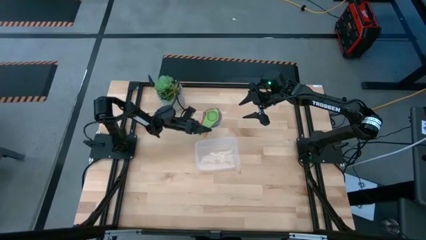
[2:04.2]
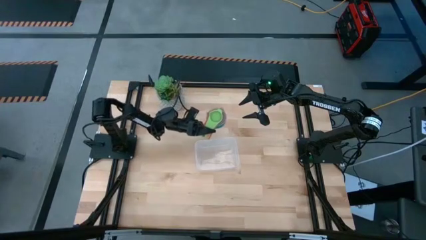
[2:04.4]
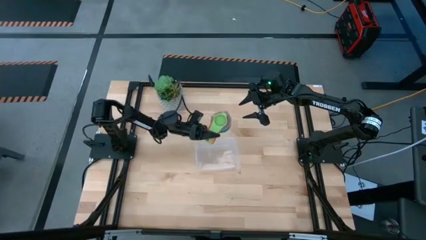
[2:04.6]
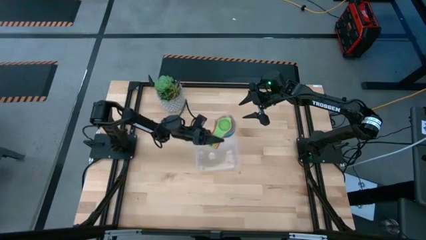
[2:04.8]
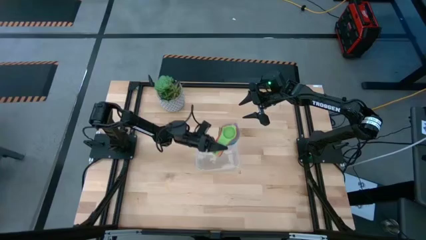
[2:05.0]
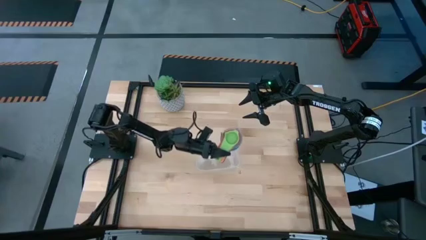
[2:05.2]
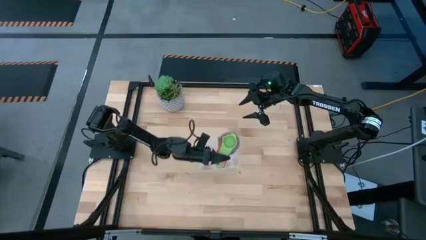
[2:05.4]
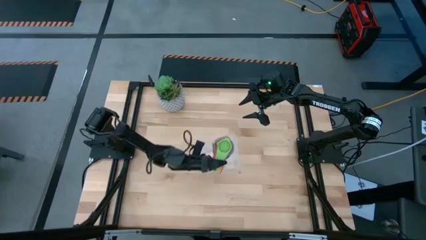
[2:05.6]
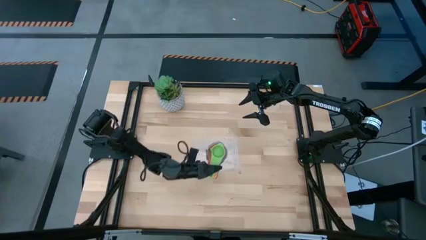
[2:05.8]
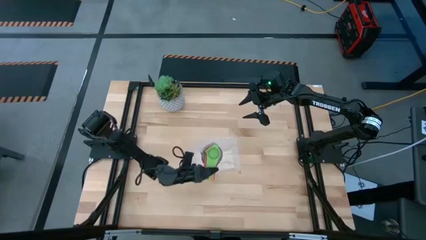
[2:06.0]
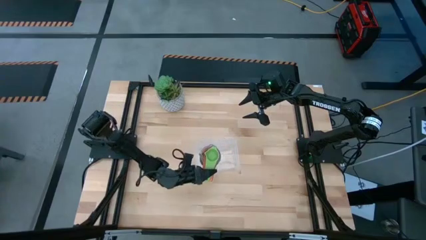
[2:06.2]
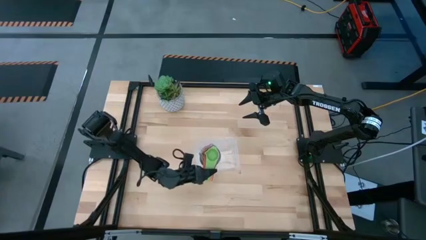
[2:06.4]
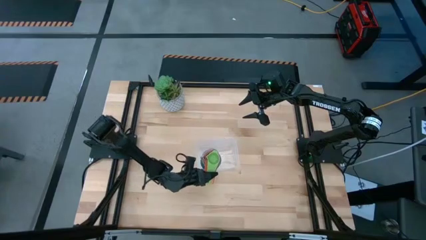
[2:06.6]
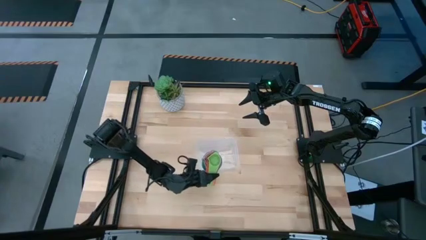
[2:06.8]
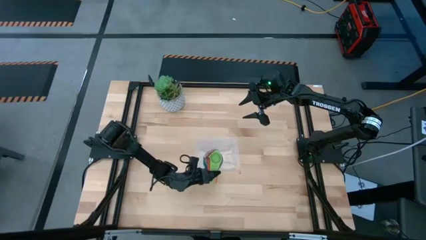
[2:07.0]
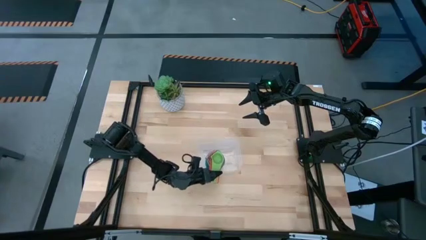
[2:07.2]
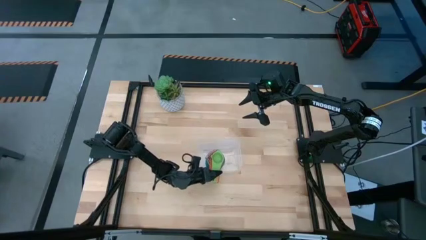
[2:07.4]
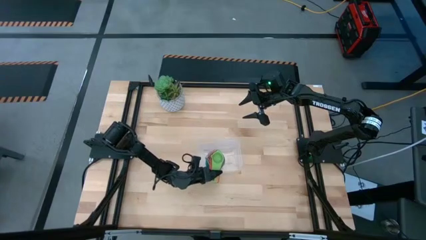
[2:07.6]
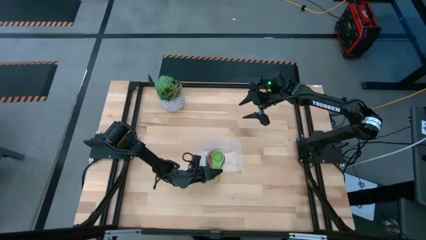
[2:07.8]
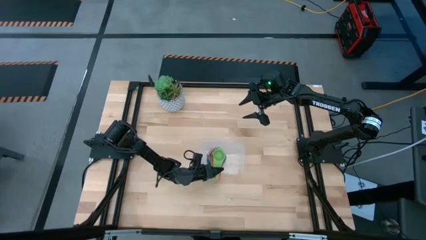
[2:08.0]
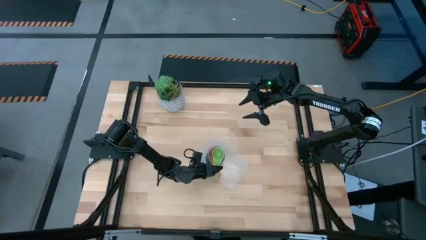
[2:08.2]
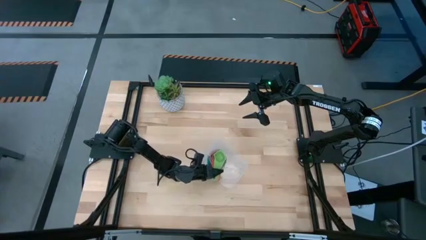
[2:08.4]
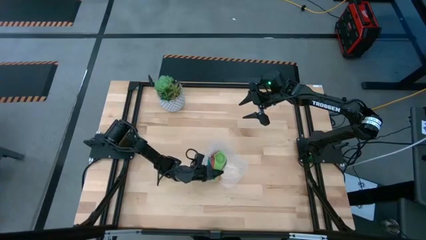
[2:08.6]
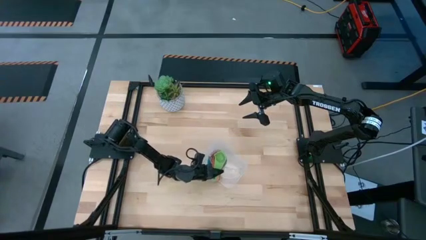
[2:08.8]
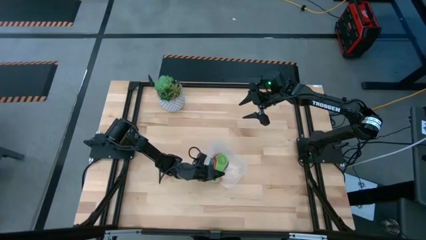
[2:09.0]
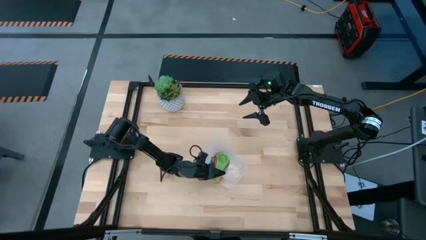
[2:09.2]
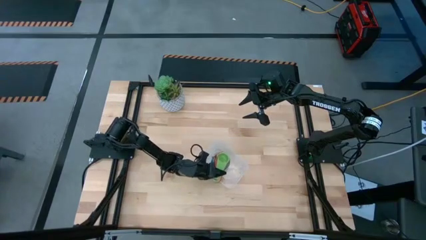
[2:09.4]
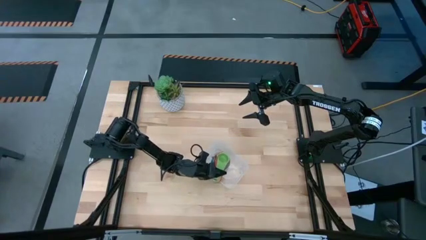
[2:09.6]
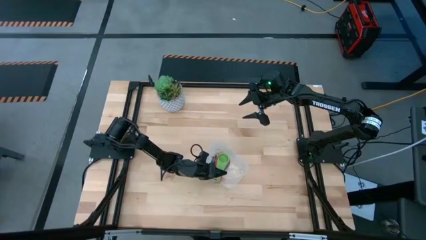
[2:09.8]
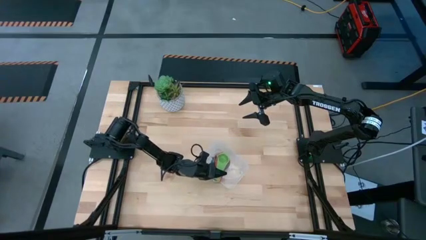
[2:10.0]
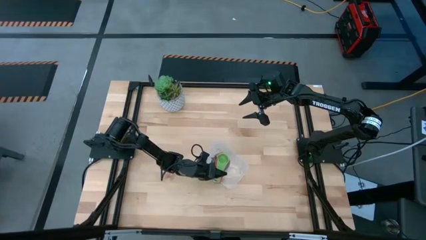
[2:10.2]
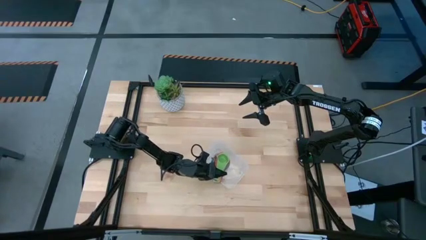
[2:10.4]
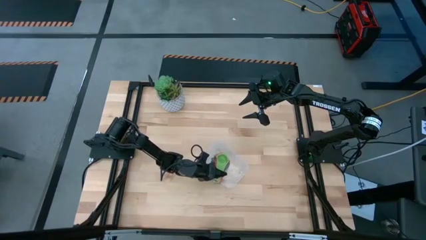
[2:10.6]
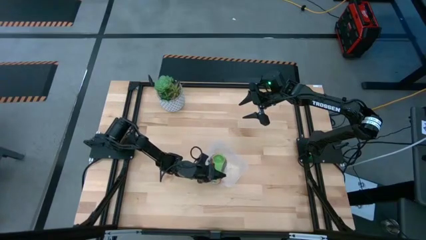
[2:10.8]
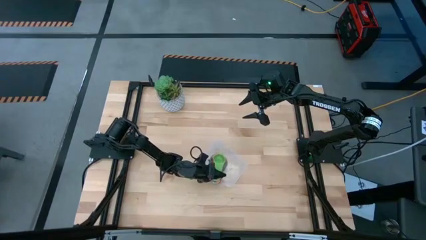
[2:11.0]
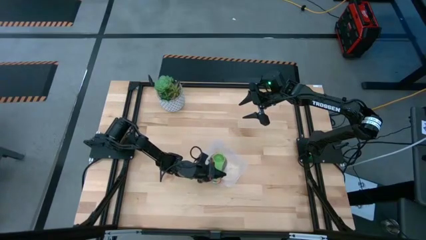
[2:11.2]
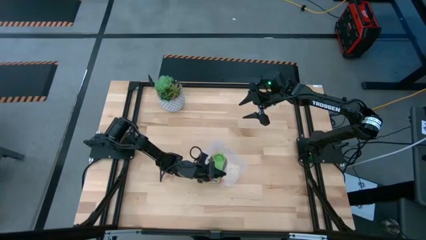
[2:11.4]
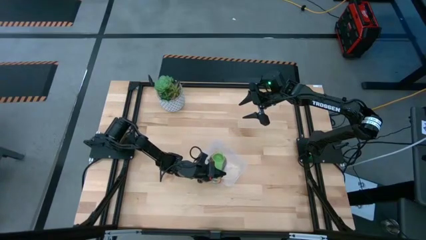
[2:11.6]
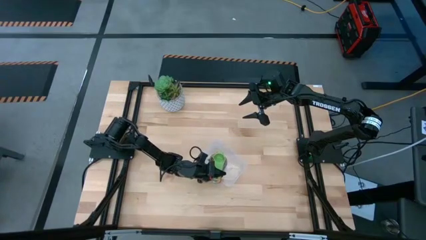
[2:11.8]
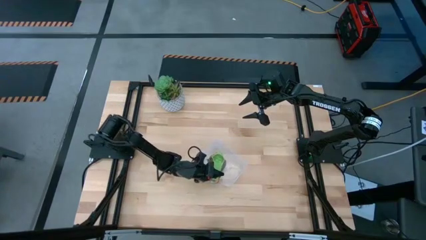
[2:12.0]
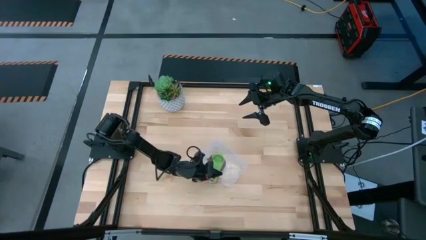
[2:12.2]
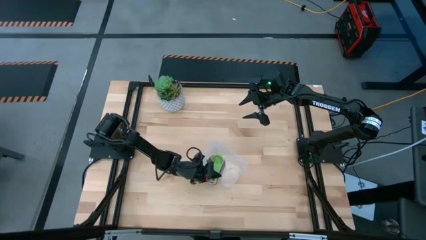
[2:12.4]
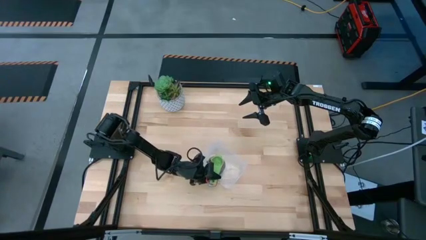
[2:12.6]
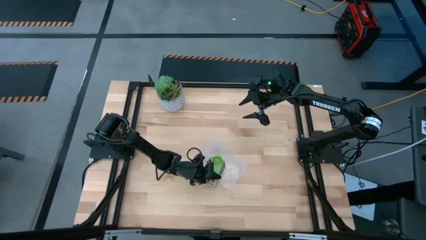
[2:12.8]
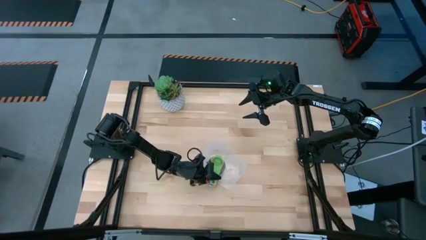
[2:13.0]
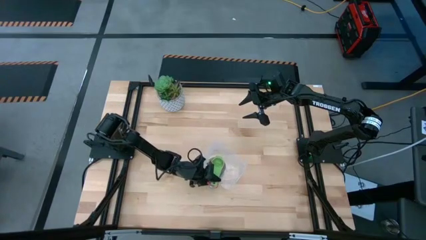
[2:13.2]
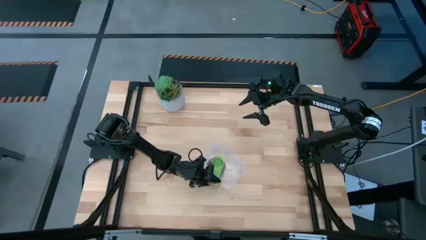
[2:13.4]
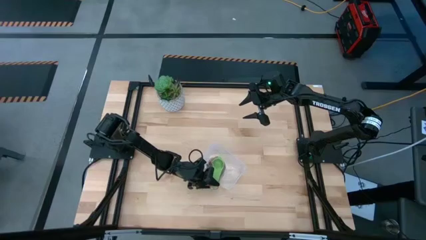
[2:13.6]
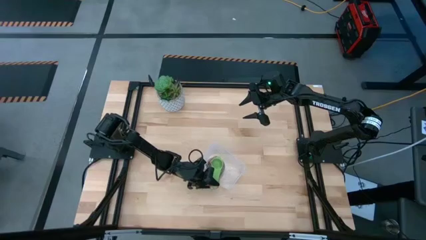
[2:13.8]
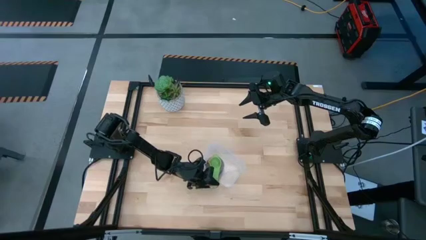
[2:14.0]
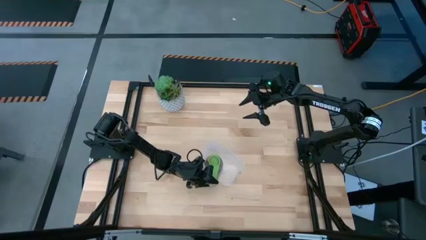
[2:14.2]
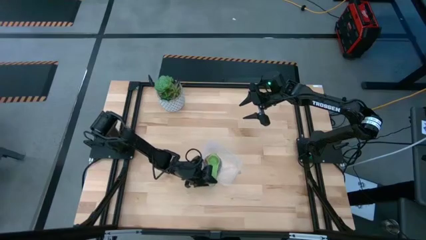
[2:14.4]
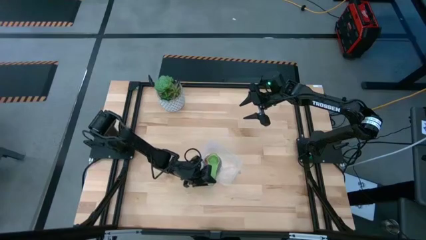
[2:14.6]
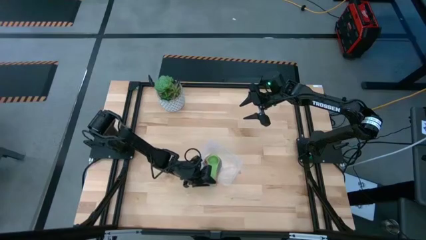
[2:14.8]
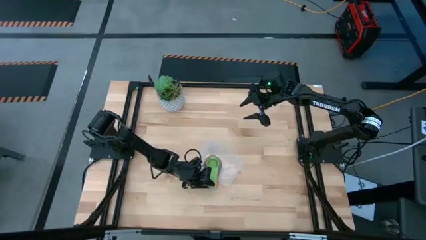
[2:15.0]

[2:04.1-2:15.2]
Task: Nest measuring cups in basket
Put the stacked measuring cups into the transparent bin
